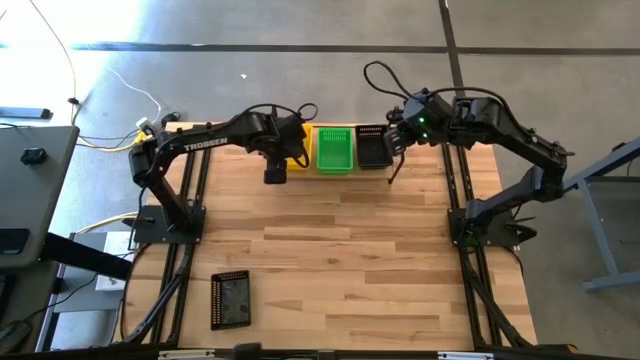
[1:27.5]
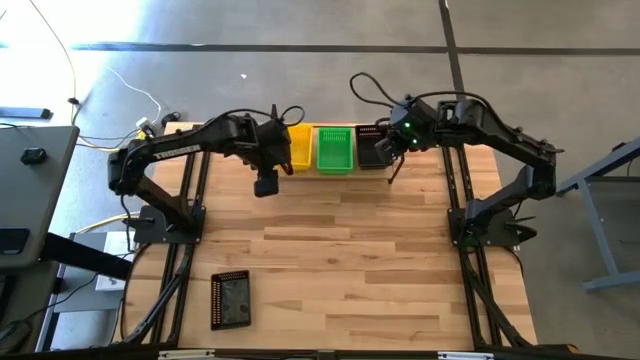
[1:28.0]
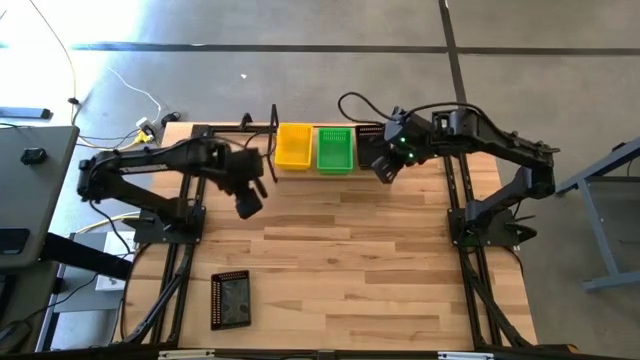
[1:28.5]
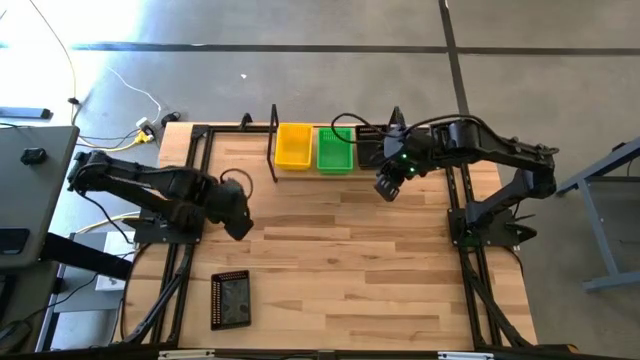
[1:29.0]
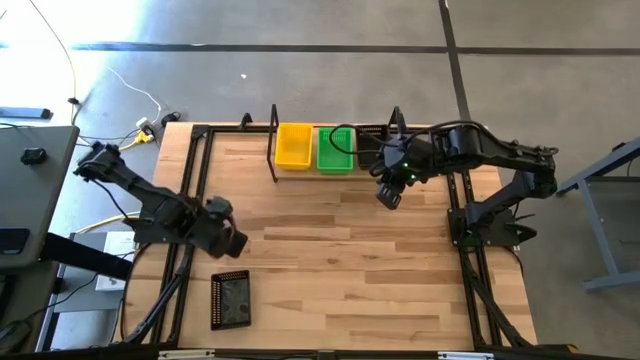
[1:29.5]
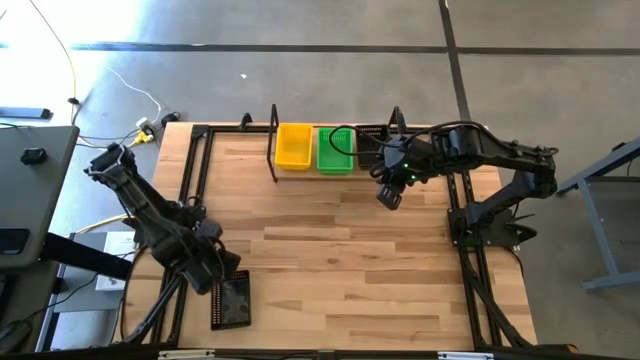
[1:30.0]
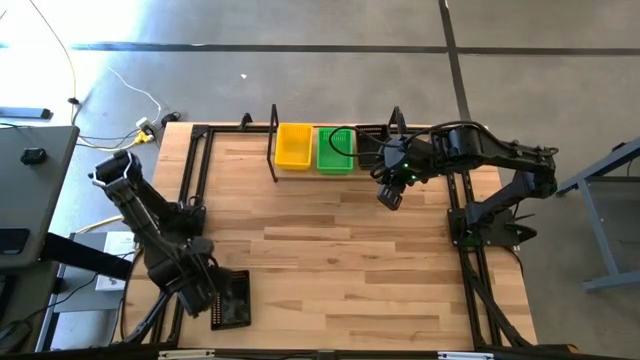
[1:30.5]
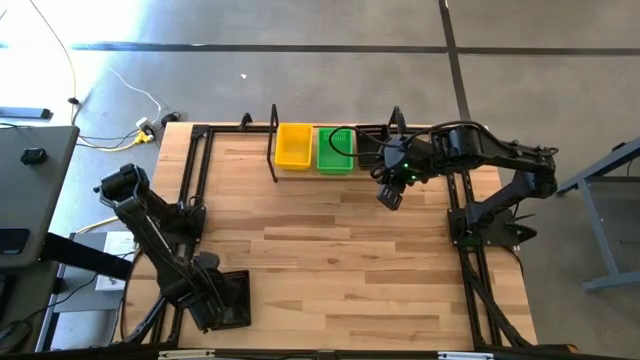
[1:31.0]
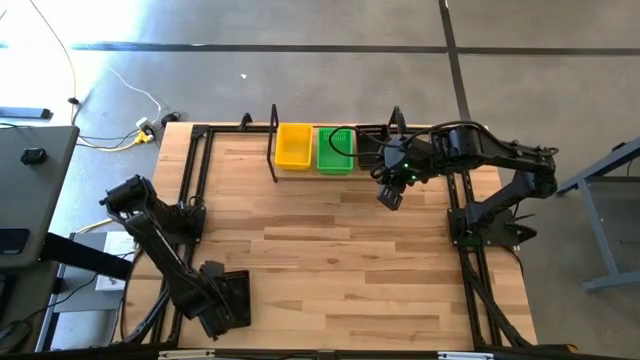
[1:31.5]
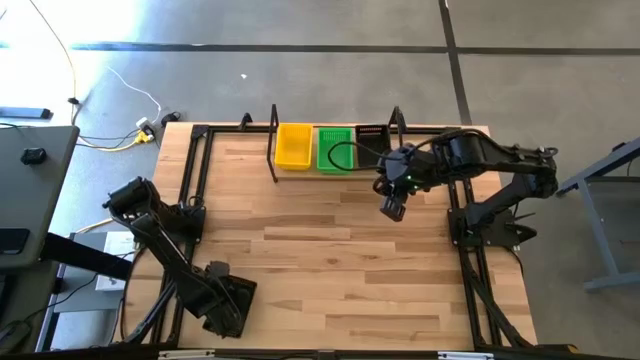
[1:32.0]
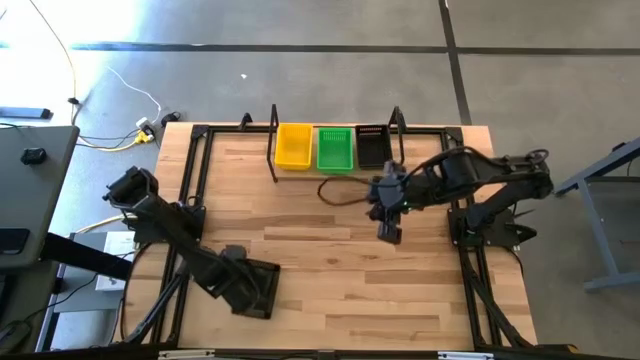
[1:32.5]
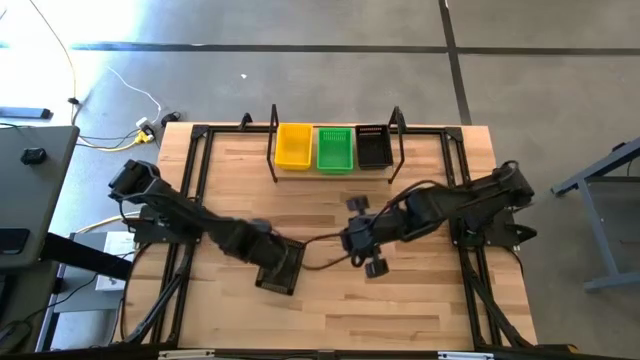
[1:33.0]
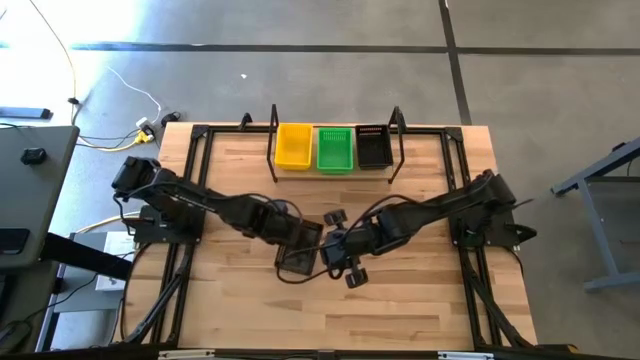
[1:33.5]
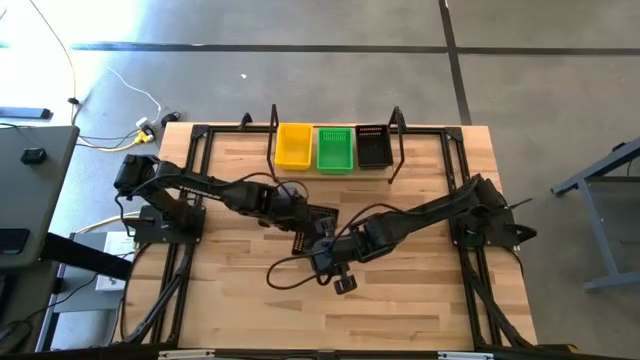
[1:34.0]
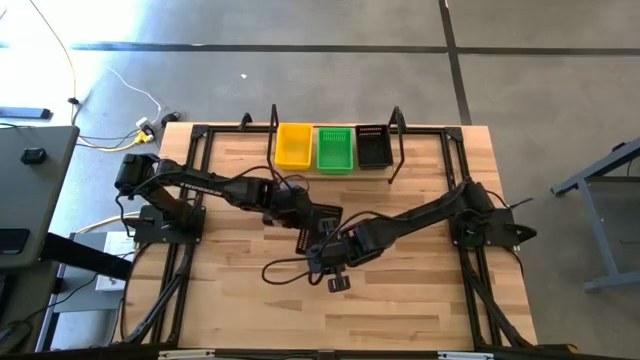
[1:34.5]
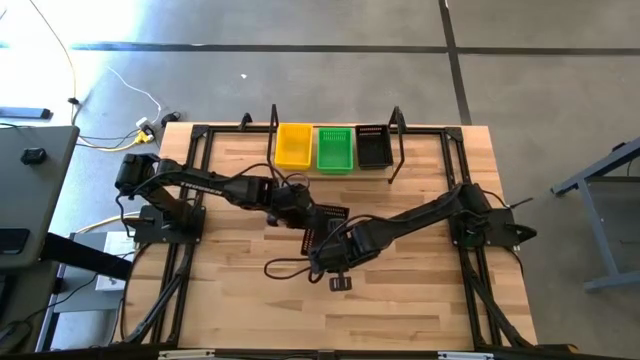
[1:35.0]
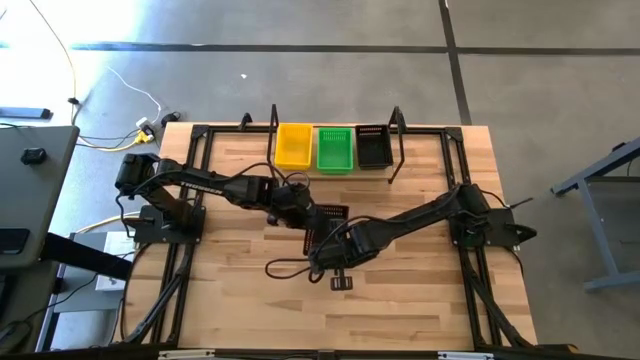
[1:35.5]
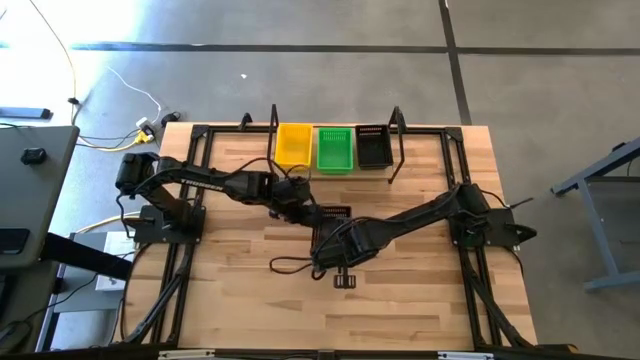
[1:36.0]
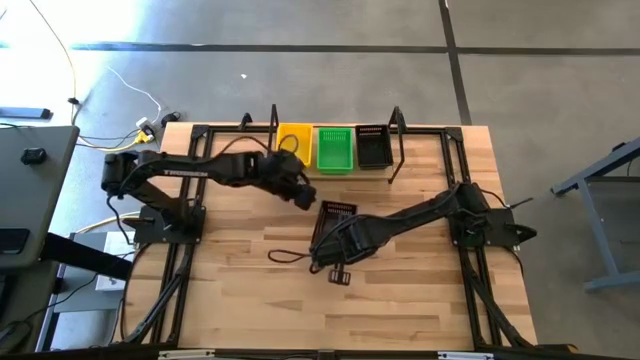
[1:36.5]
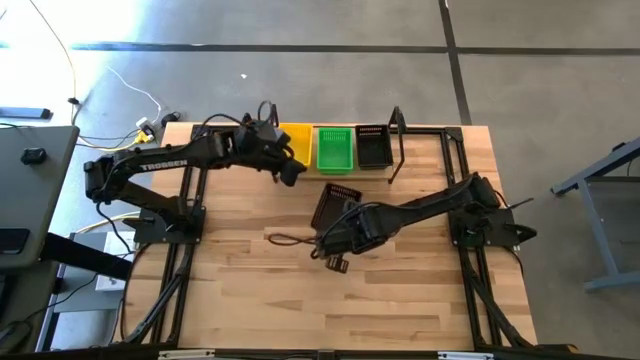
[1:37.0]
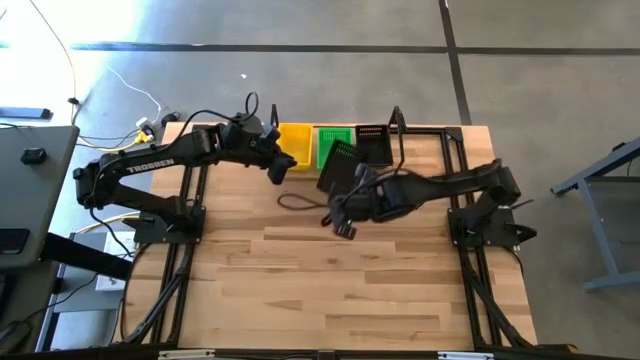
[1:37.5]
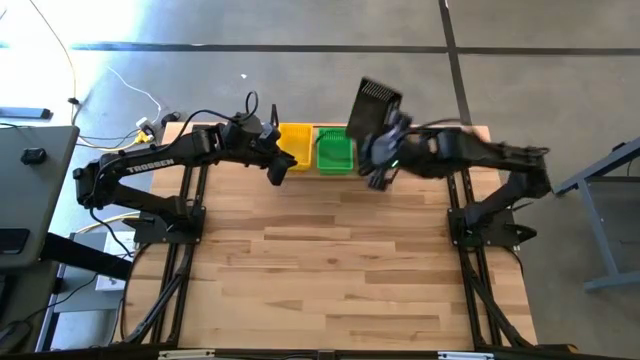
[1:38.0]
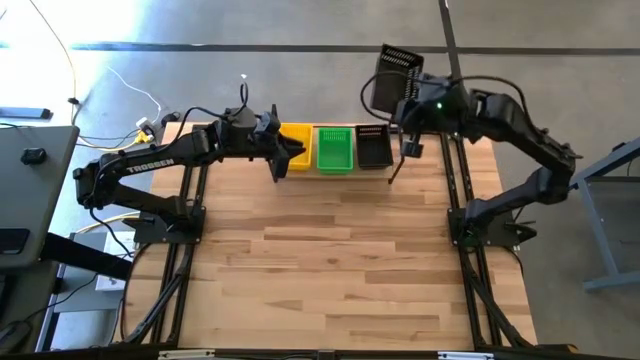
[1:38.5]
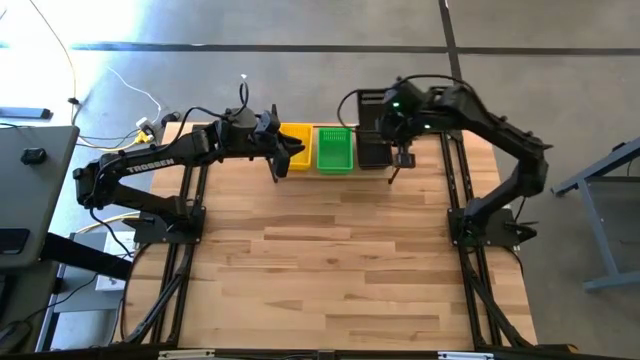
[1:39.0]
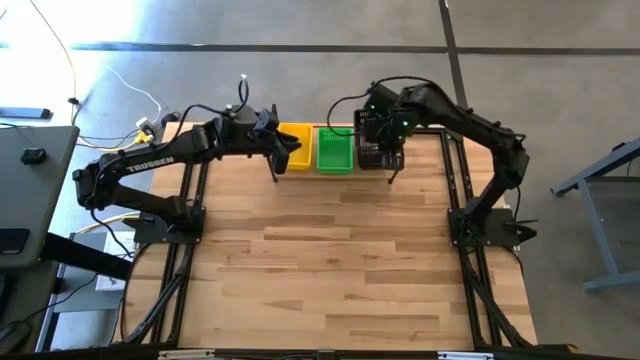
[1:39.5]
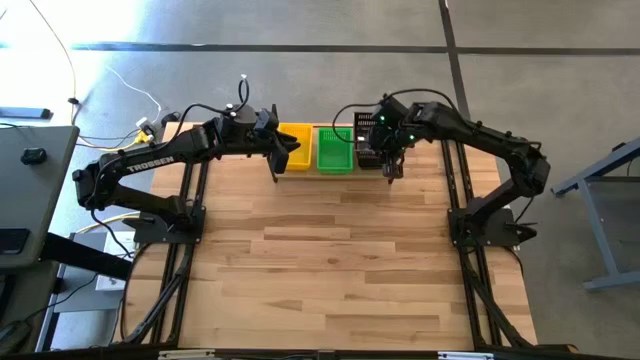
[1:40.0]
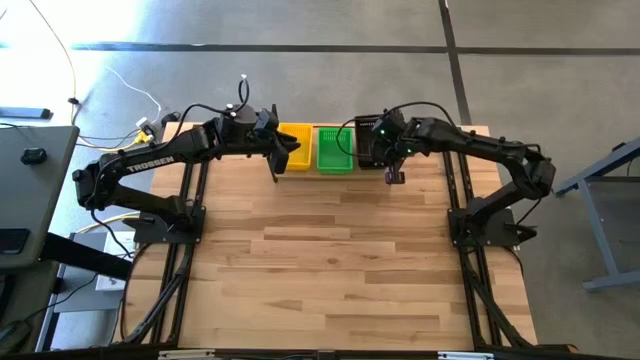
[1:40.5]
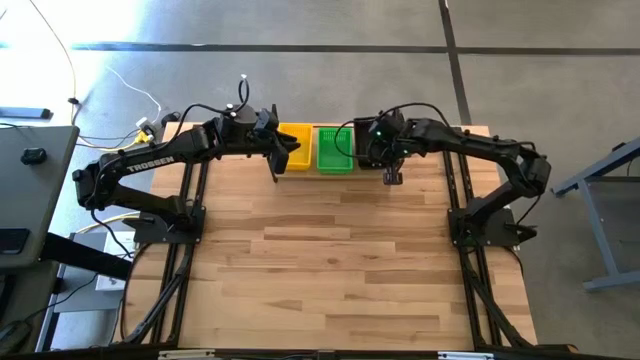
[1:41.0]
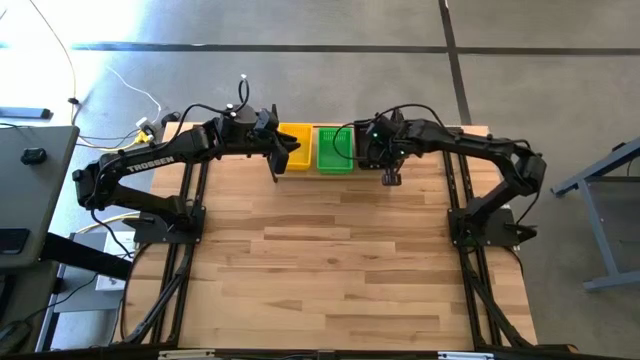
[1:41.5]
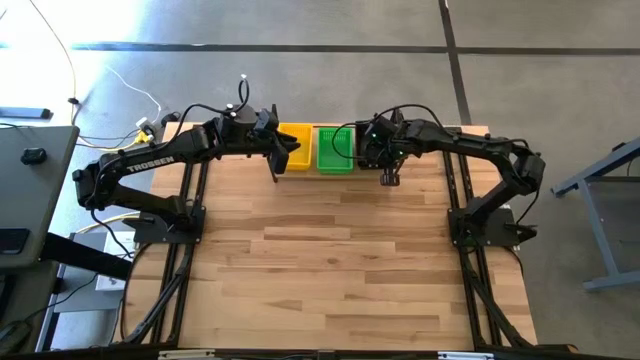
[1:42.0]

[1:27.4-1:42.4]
Task: Stack baskets on shelf by color
Stack the black bin on top of the black bins on the shelf

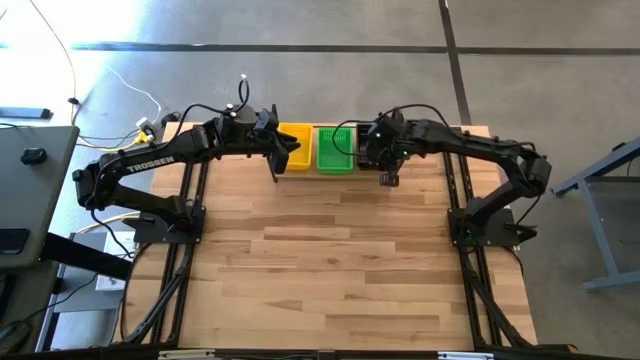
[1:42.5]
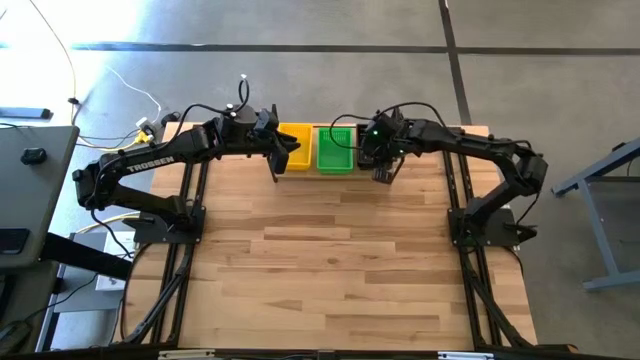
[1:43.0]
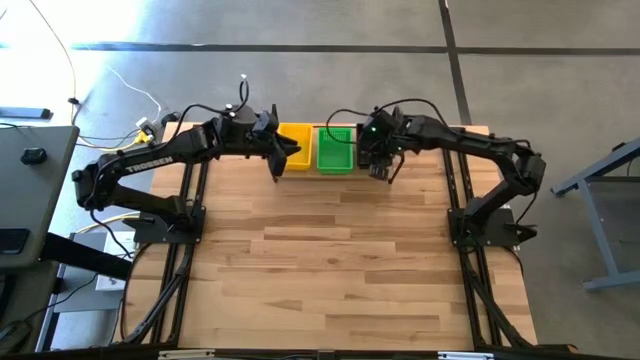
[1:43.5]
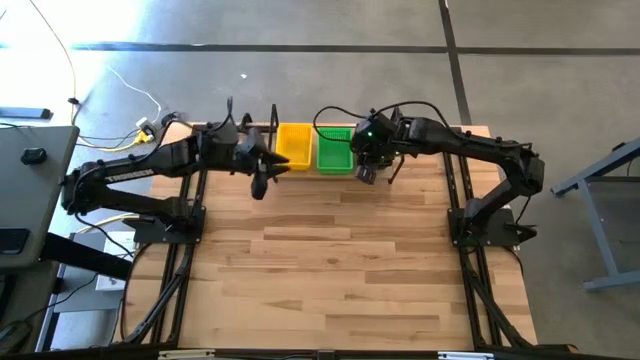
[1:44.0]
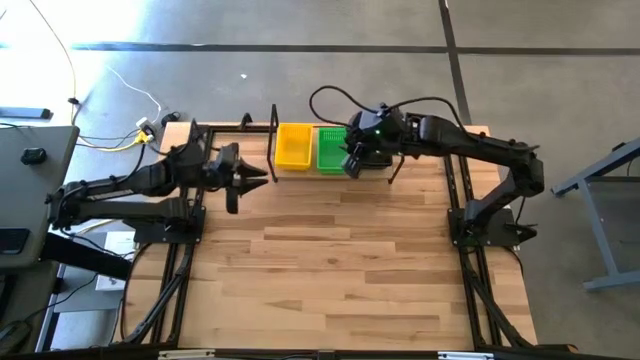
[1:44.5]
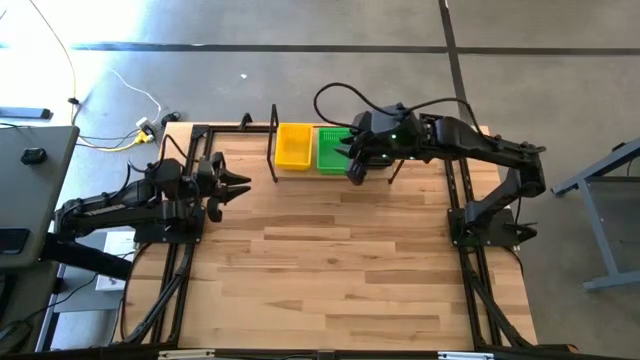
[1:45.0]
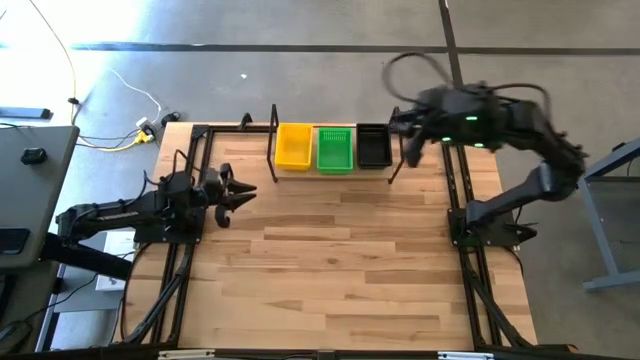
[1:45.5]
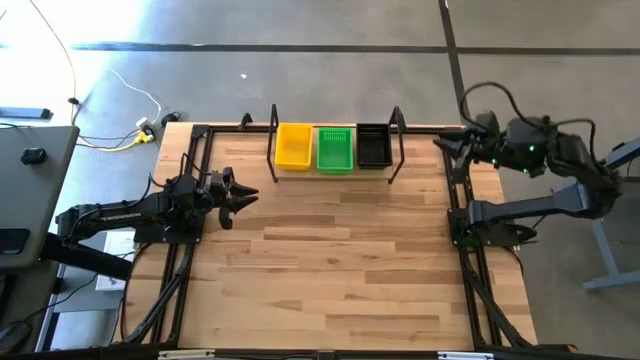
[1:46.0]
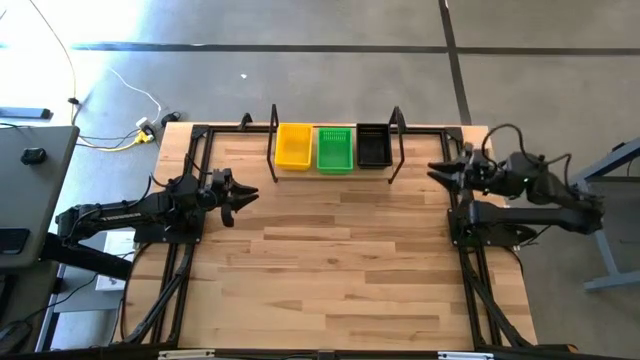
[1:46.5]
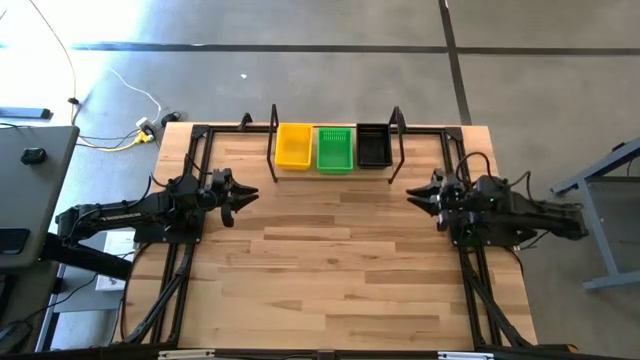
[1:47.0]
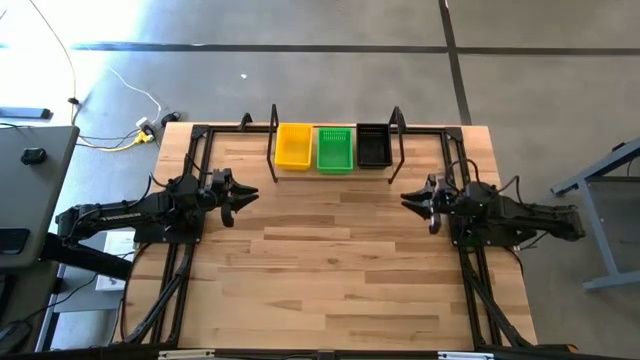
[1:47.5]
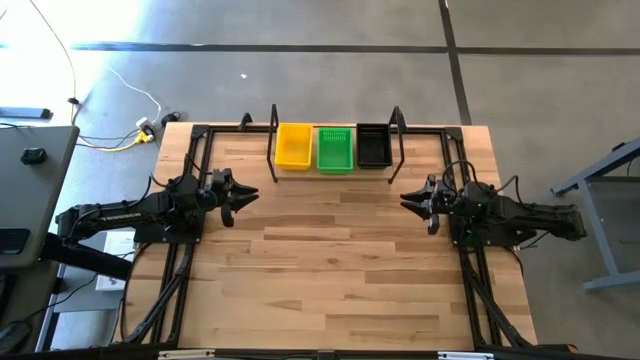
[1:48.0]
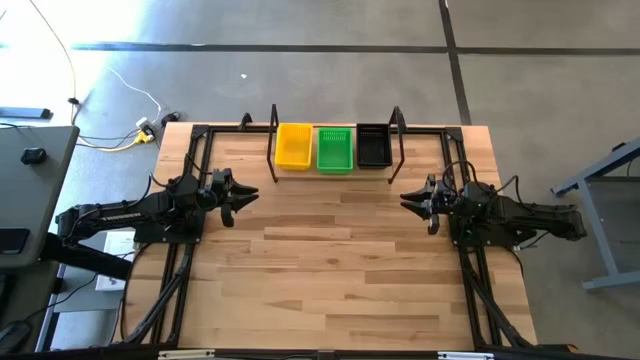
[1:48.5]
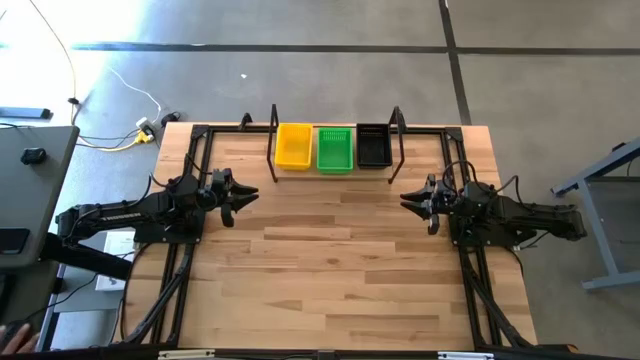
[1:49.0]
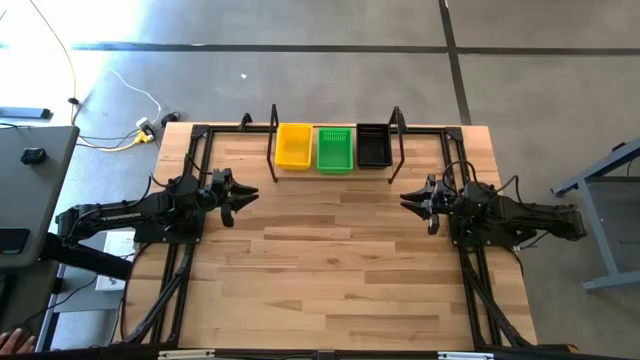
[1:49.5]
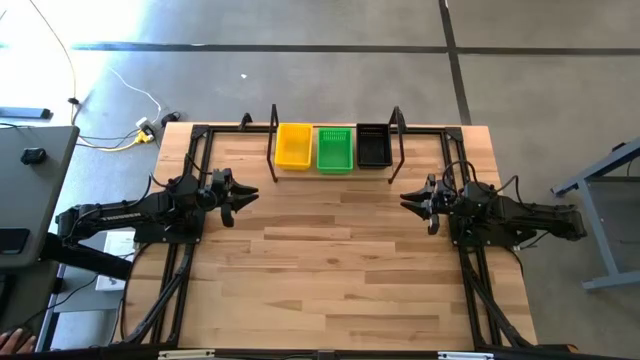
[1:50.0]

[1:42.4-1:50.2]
Return to home position
